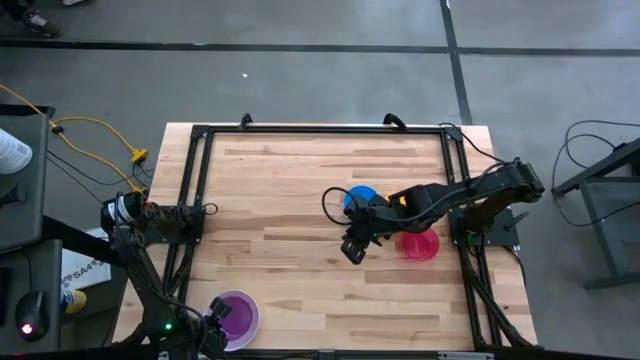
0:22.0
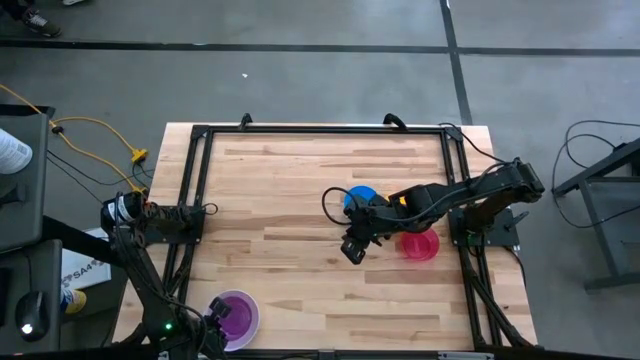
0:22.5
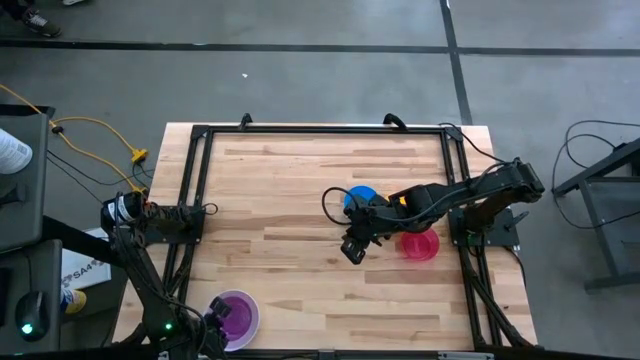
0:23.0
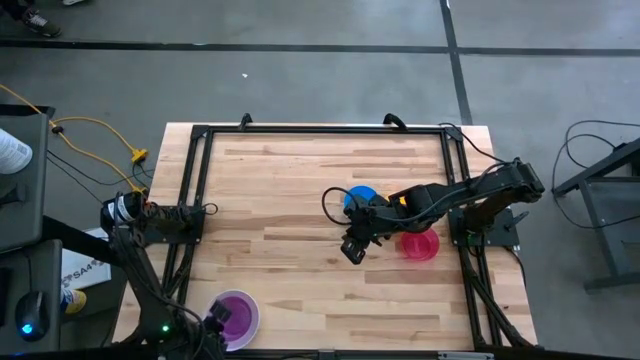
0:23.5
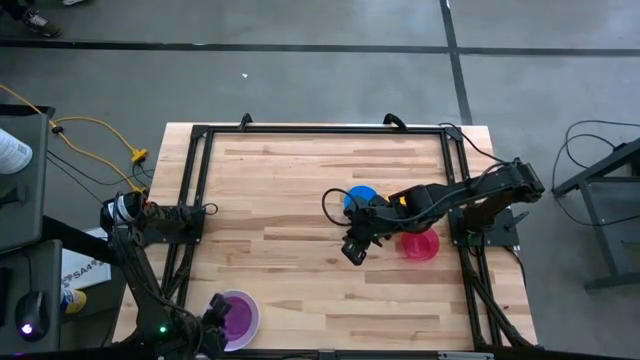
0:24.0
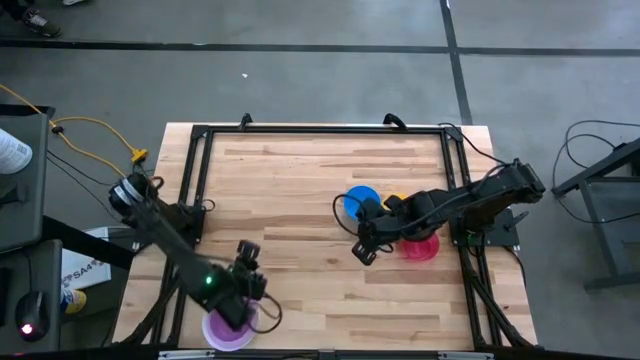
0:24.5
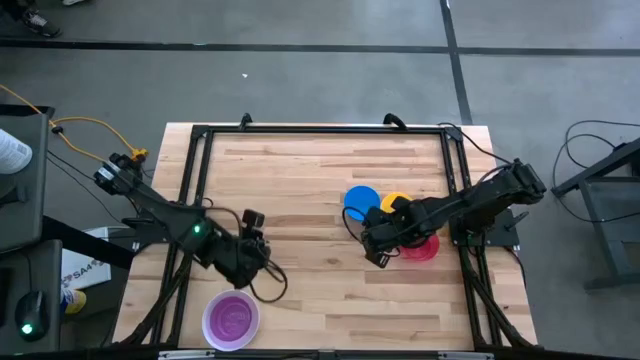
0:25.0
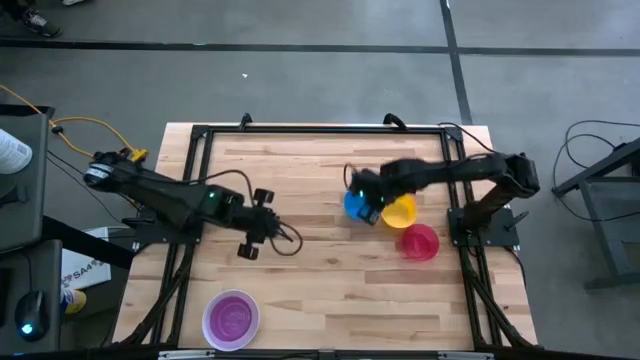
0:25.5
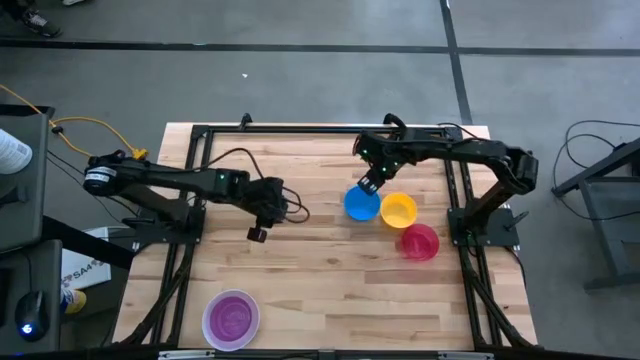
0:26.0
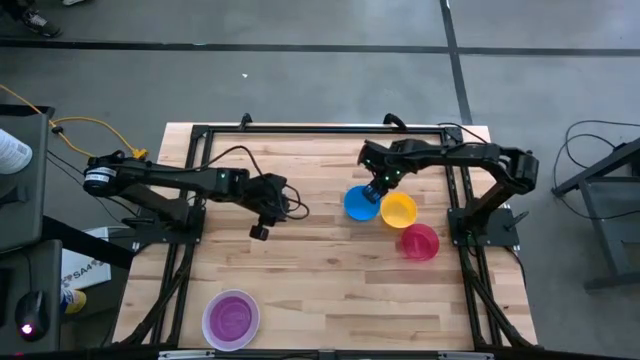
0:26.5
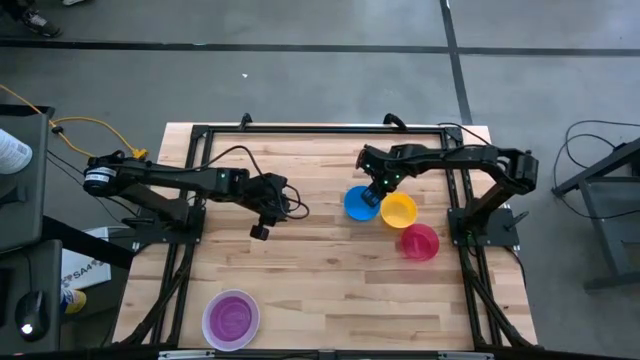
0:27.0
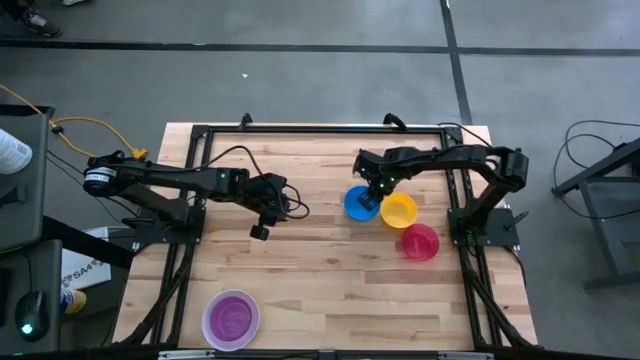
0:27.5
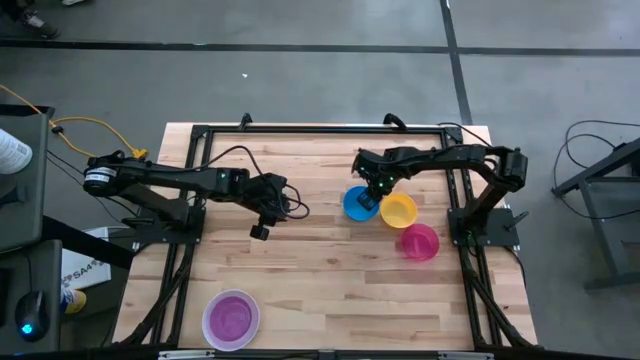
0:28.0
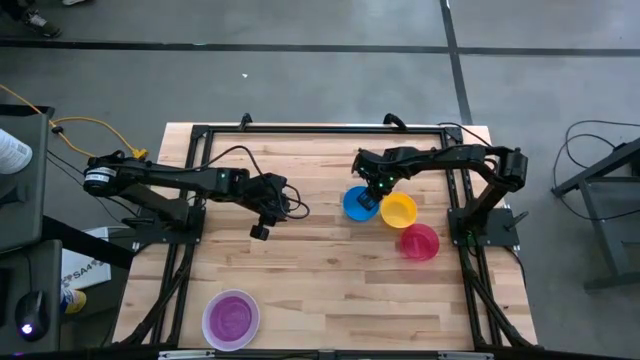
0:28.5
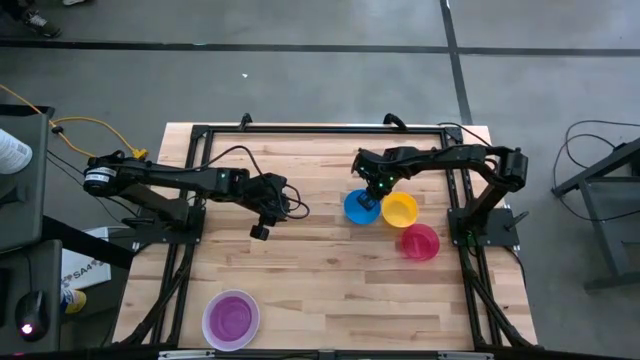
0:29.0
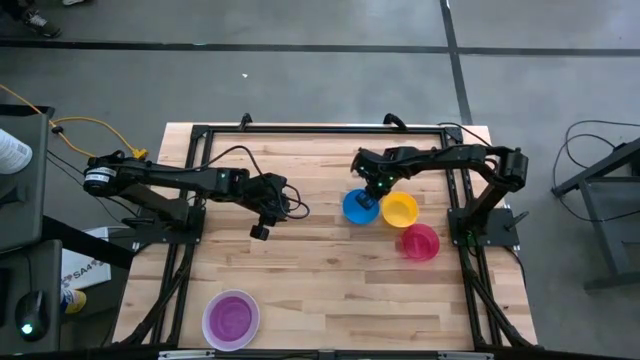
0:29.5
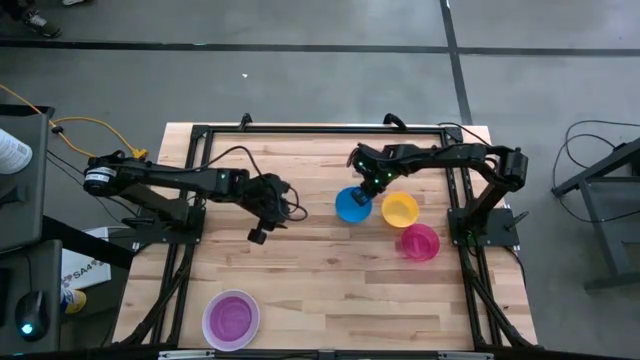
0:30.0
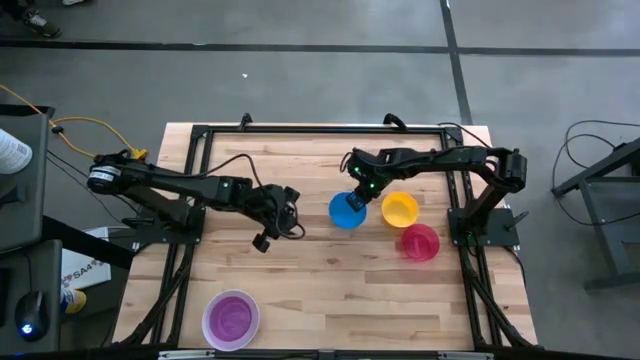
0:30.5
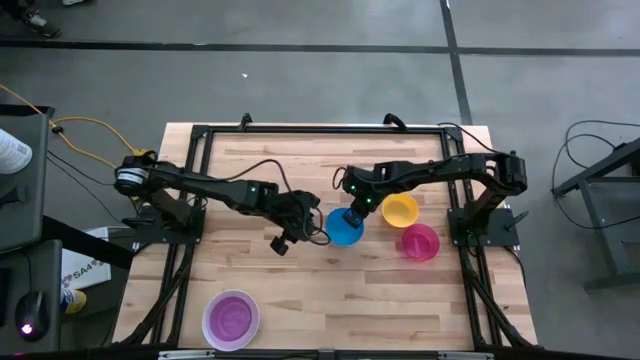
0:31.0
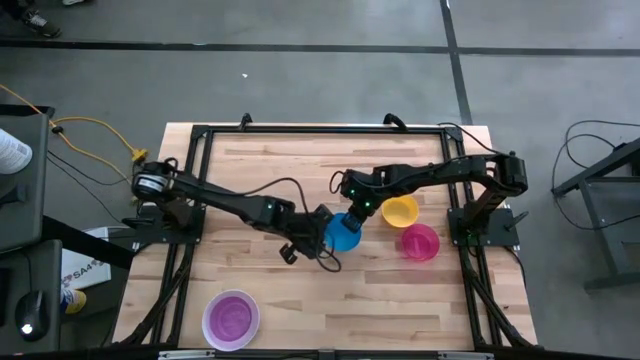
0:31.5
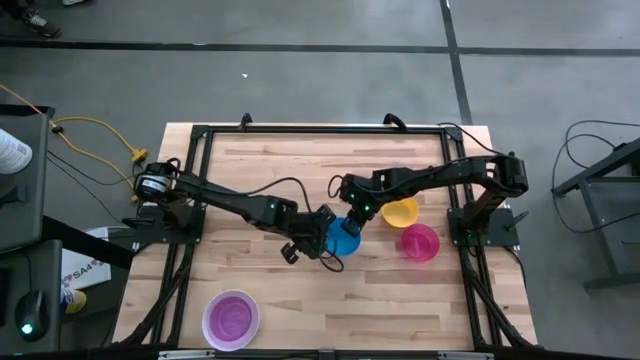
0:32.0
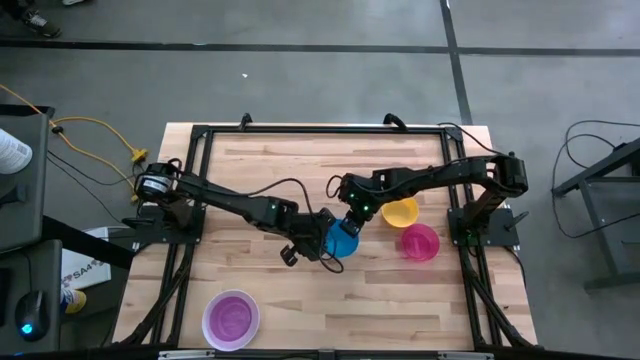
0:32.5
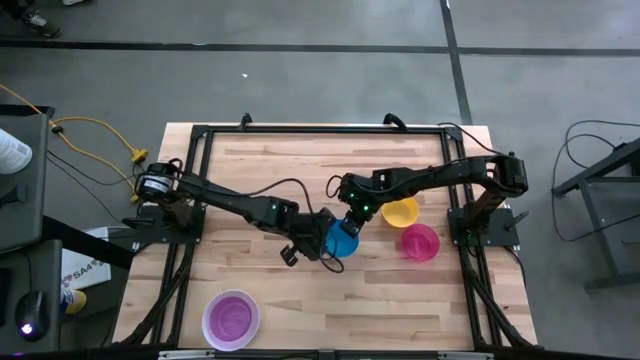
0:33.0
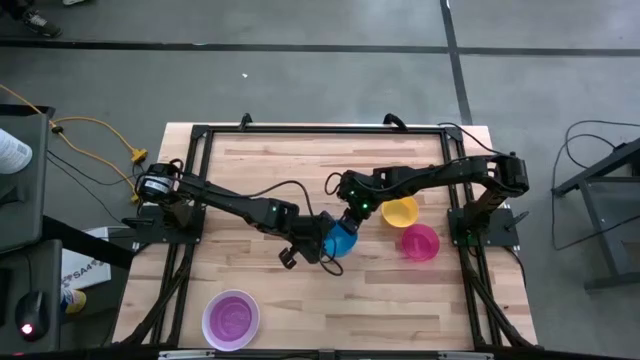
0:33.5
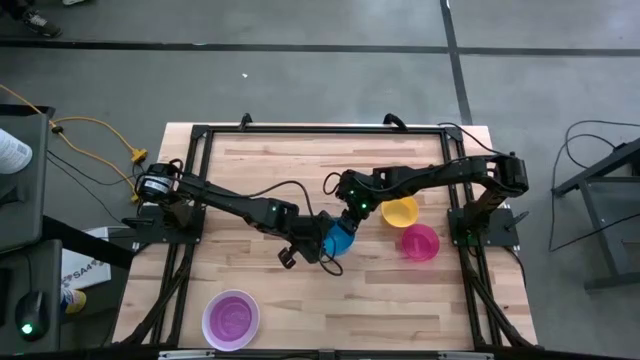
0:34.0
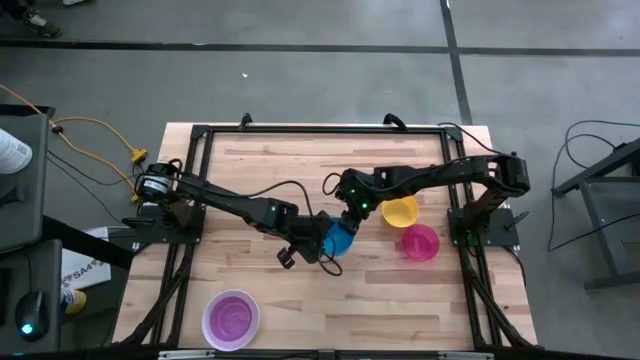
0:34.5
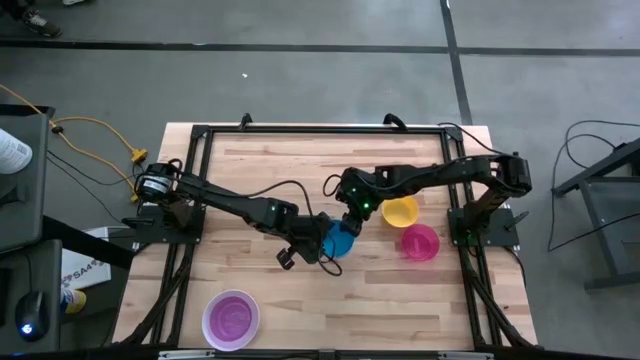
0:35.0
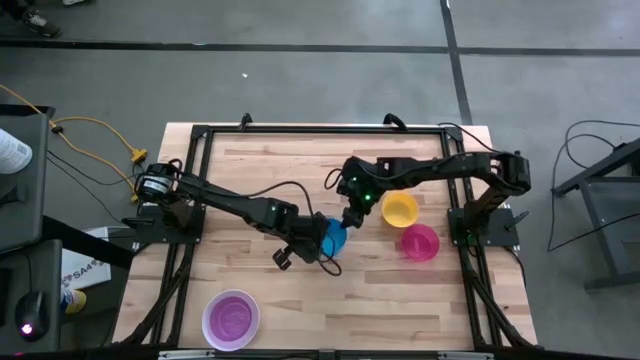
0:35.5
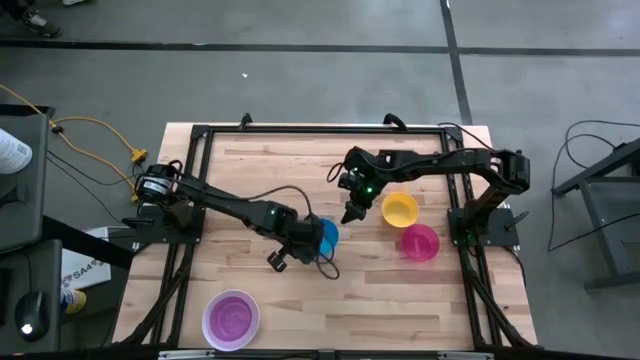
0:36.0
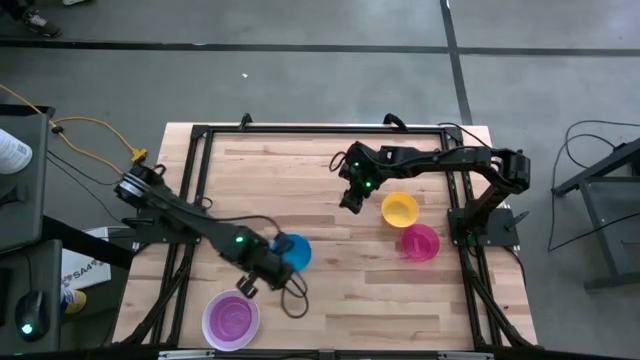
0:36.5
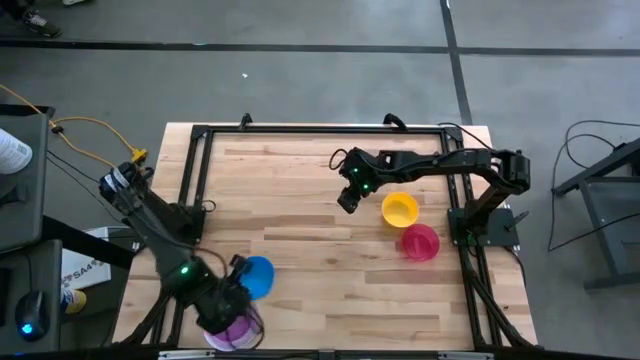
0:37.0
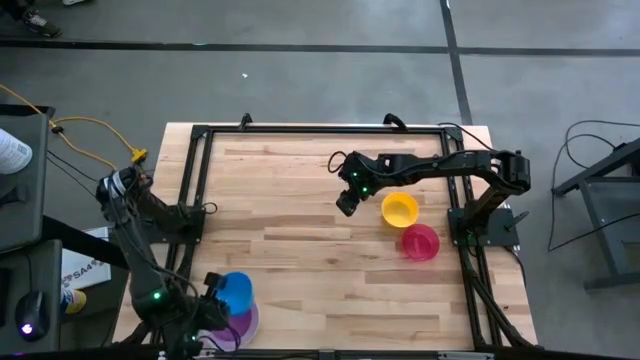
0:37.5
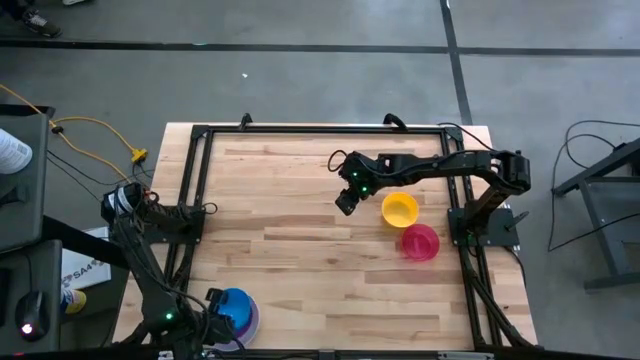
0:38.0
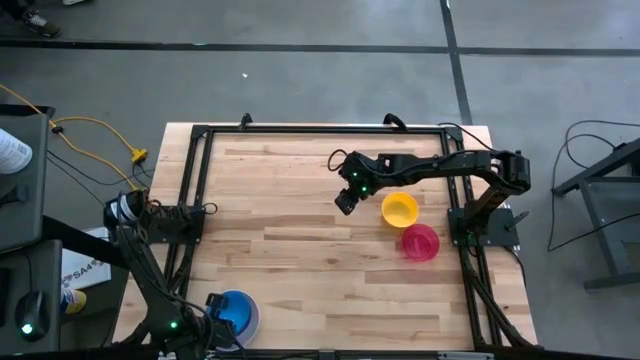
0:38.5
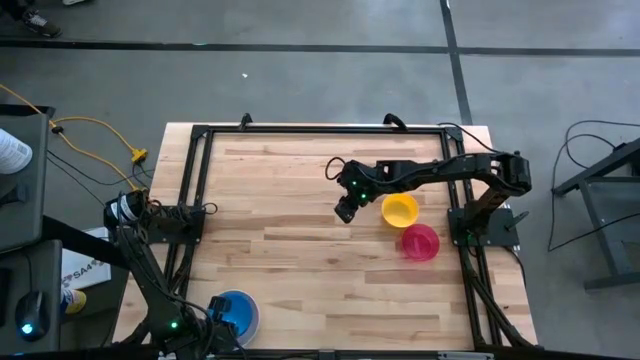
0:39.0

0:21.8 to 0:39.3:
Stack the blue bowl on the violet bowl

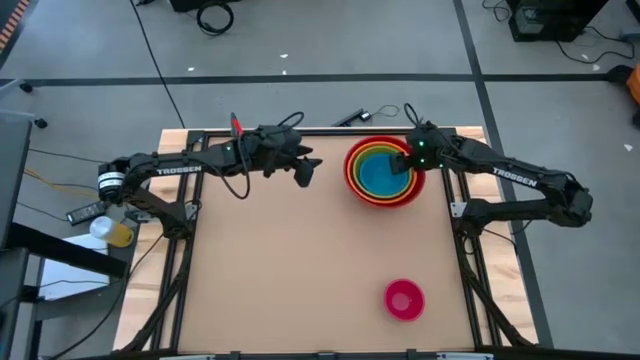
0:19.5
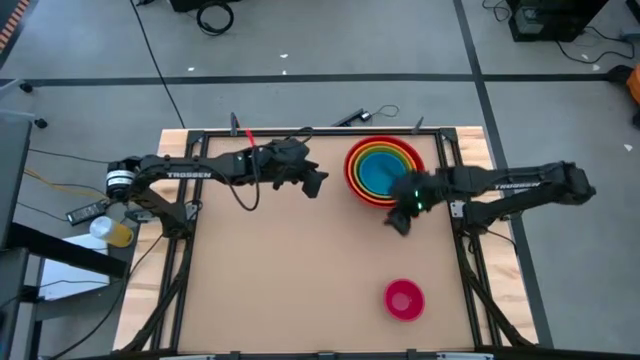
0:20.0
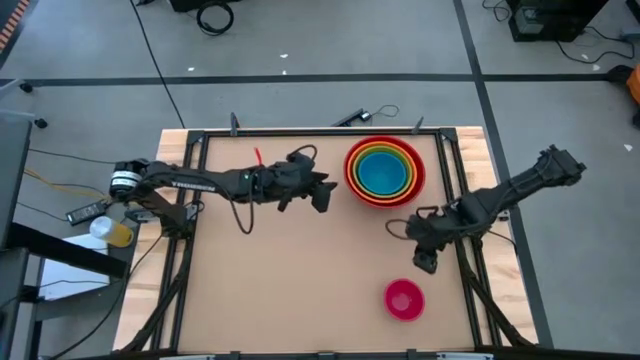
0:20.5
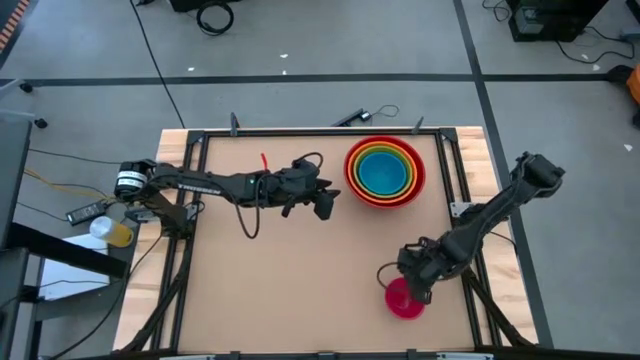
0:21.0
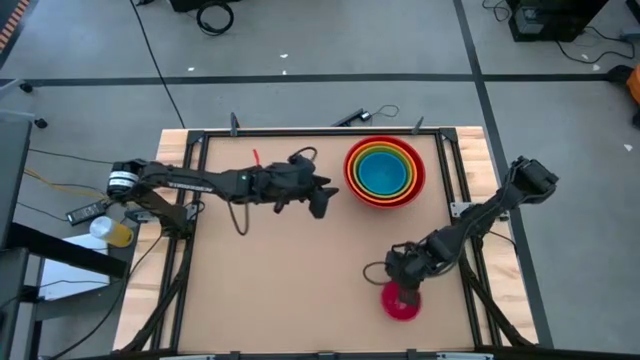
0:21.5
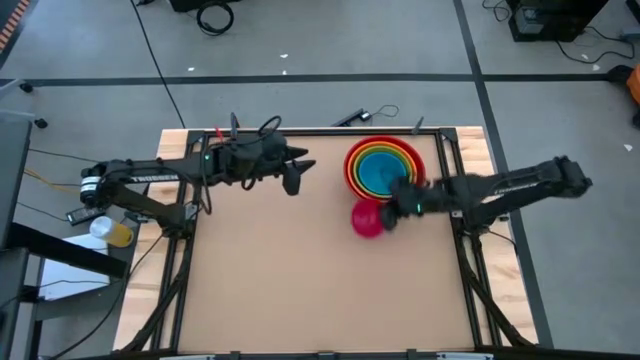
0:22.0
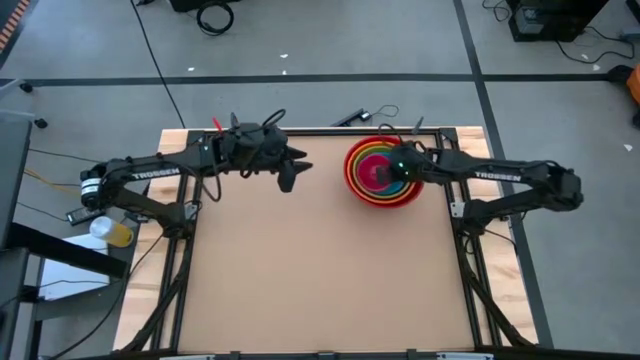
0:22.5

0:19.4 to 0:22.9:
Stack the pink bowl on top of the blue bowl
